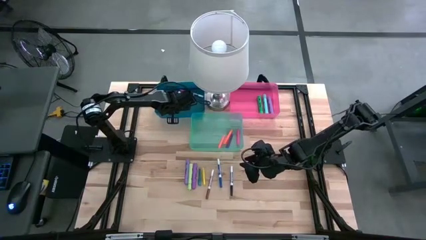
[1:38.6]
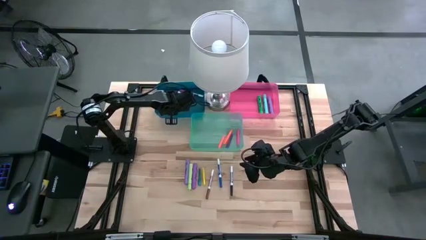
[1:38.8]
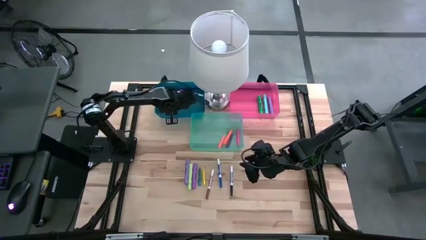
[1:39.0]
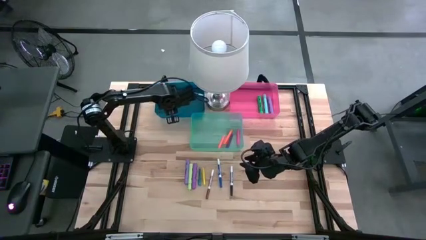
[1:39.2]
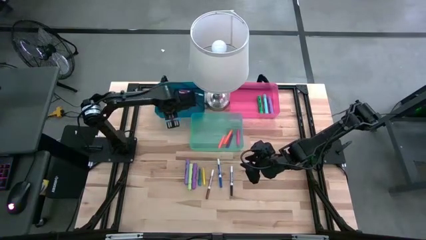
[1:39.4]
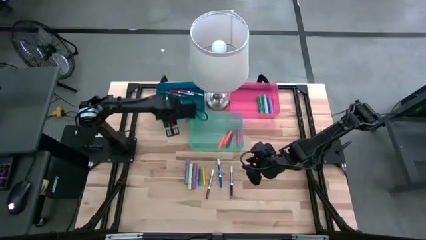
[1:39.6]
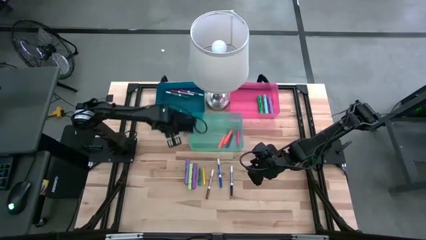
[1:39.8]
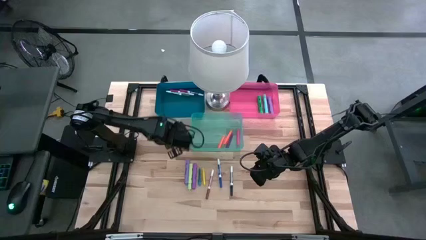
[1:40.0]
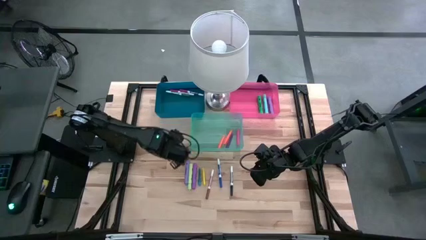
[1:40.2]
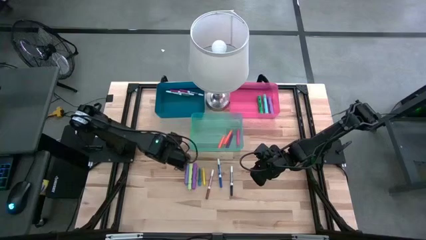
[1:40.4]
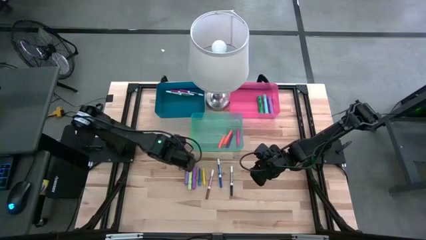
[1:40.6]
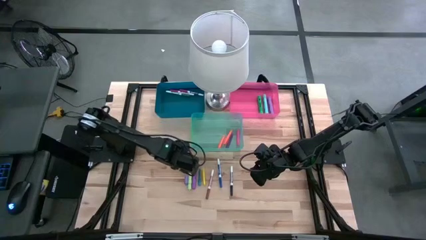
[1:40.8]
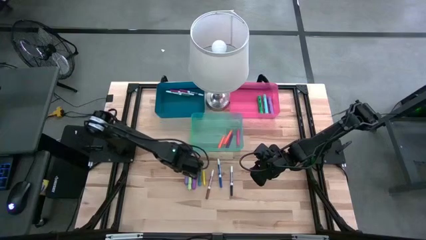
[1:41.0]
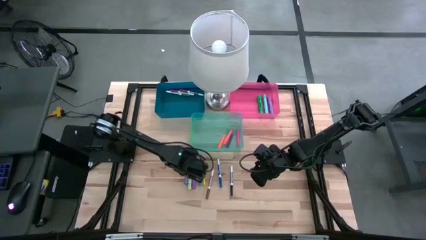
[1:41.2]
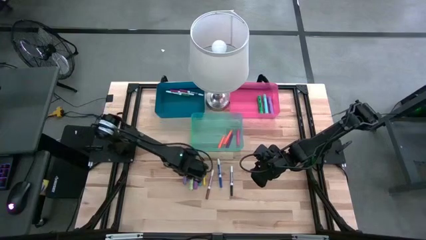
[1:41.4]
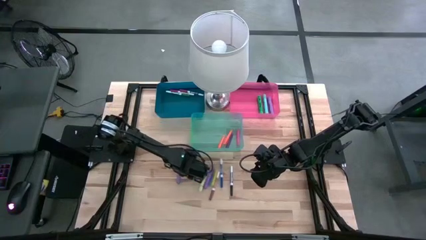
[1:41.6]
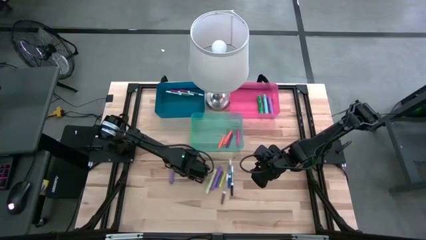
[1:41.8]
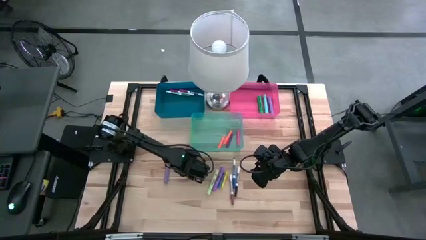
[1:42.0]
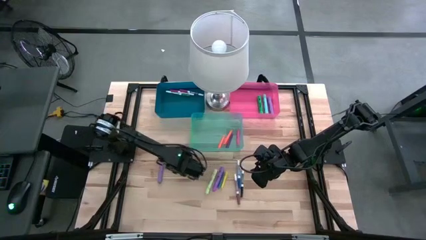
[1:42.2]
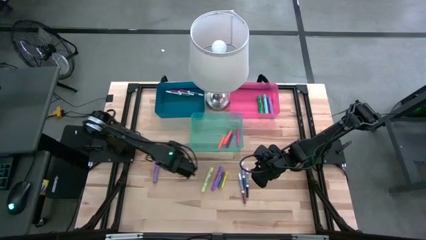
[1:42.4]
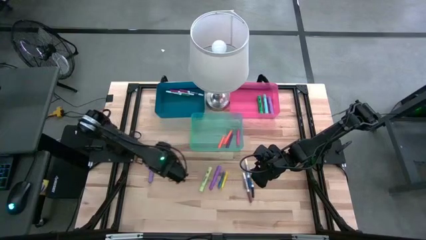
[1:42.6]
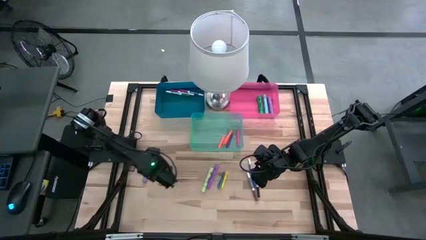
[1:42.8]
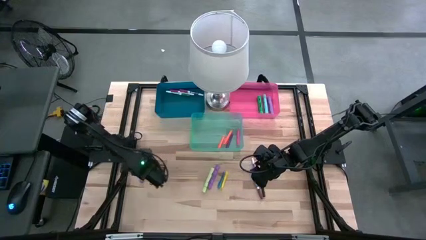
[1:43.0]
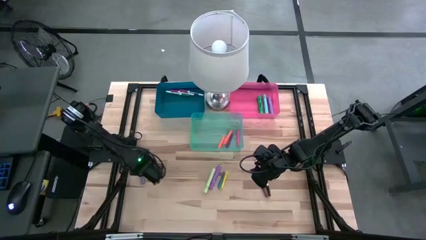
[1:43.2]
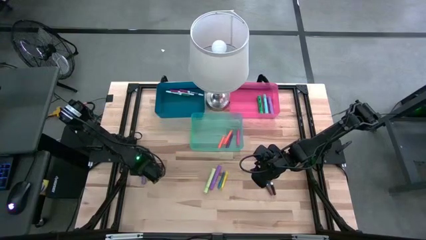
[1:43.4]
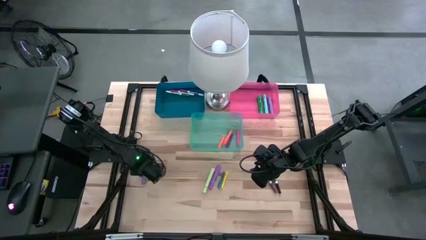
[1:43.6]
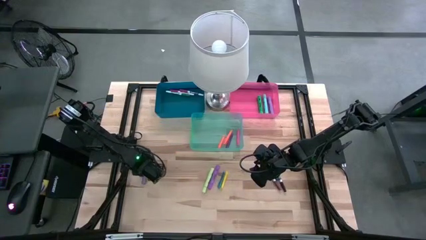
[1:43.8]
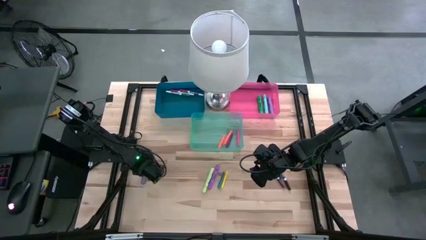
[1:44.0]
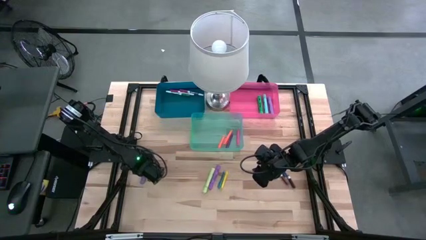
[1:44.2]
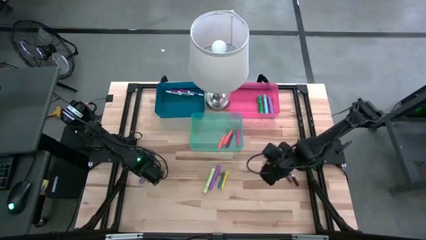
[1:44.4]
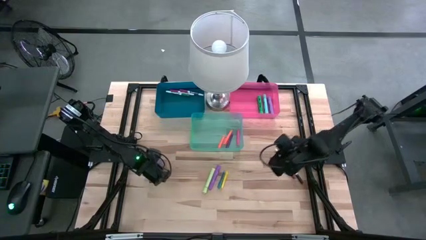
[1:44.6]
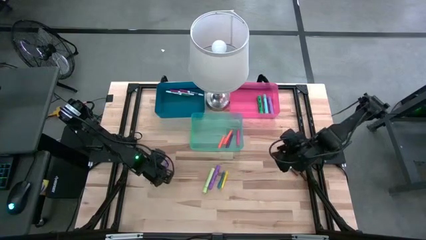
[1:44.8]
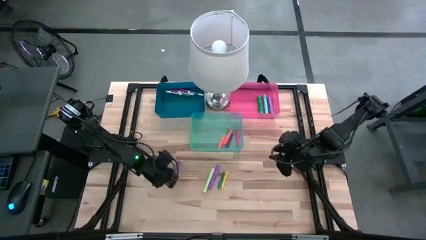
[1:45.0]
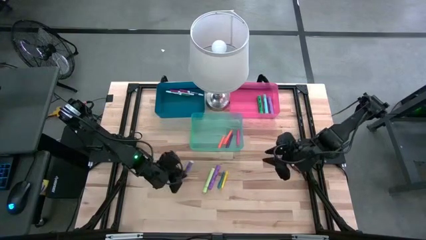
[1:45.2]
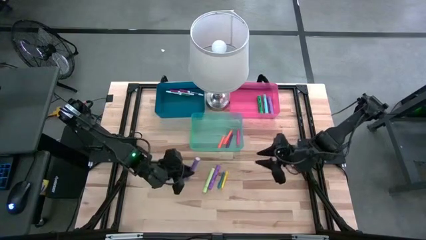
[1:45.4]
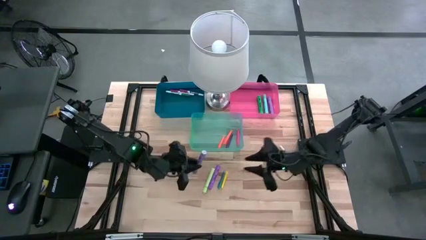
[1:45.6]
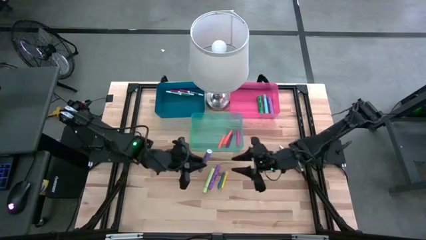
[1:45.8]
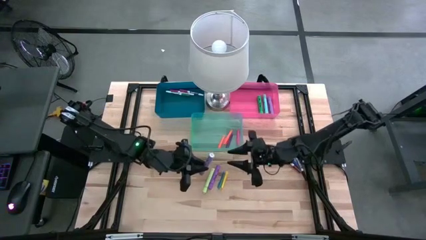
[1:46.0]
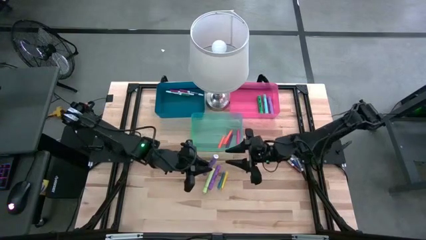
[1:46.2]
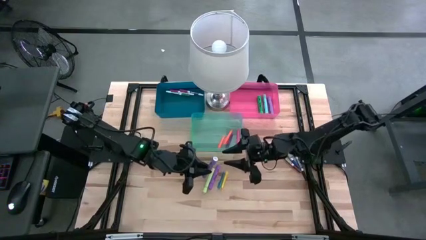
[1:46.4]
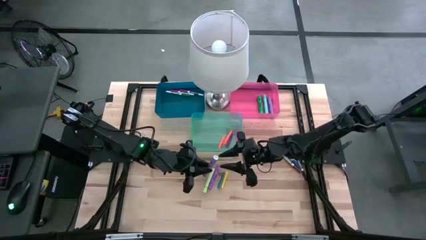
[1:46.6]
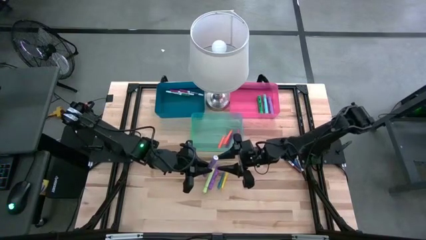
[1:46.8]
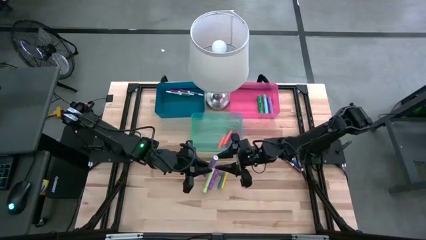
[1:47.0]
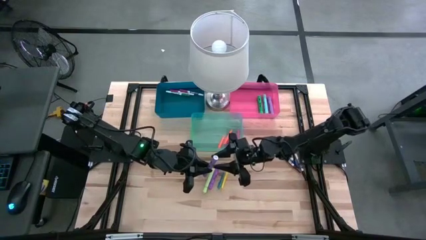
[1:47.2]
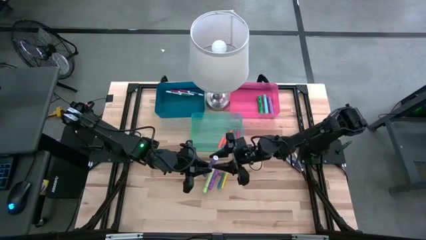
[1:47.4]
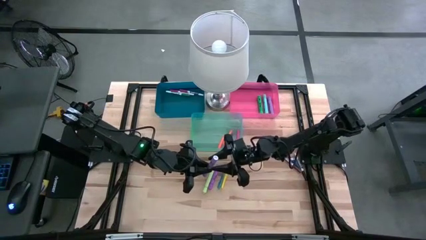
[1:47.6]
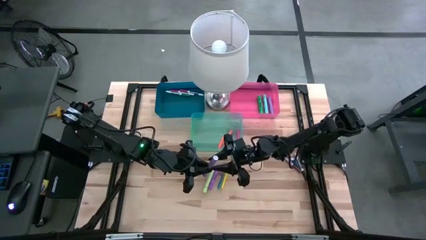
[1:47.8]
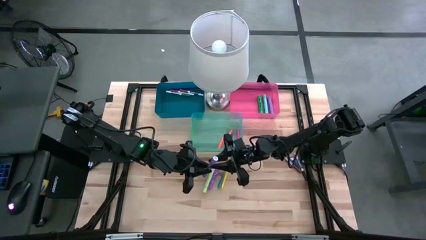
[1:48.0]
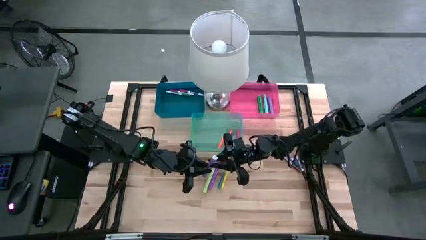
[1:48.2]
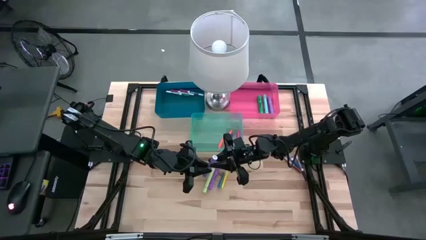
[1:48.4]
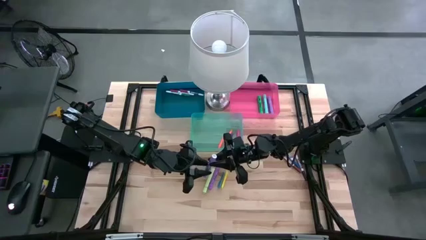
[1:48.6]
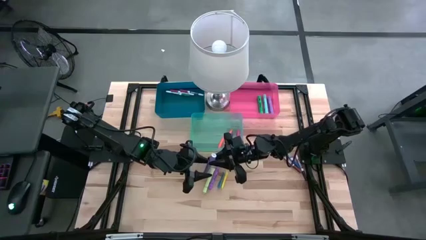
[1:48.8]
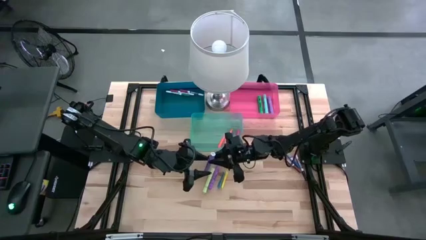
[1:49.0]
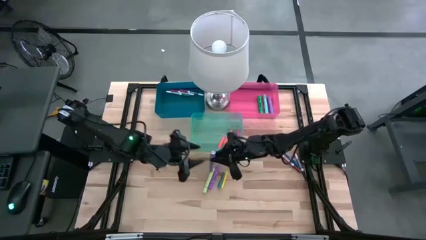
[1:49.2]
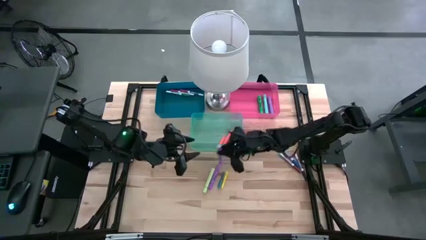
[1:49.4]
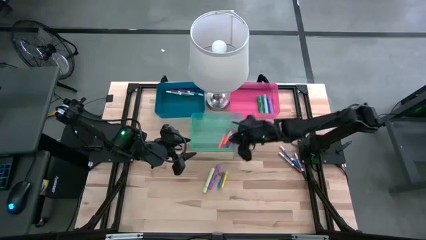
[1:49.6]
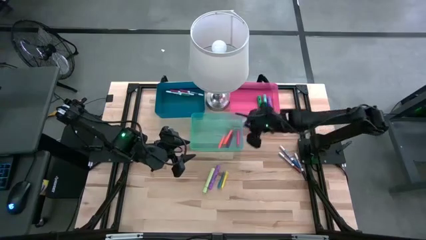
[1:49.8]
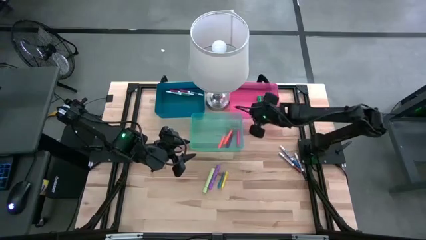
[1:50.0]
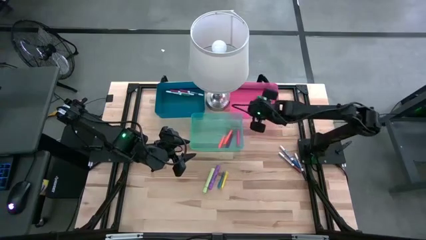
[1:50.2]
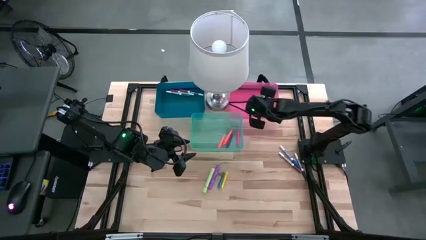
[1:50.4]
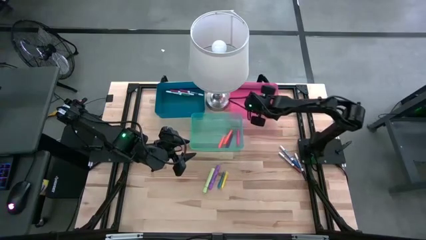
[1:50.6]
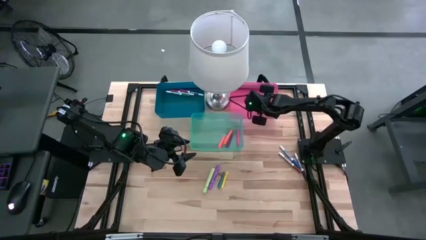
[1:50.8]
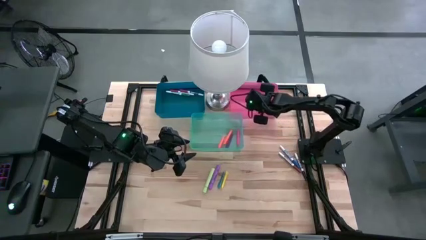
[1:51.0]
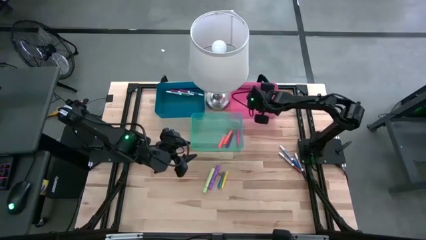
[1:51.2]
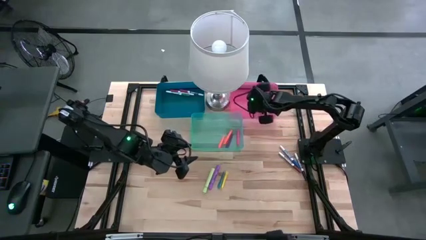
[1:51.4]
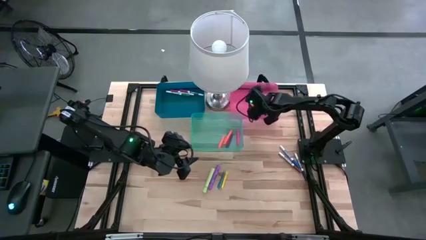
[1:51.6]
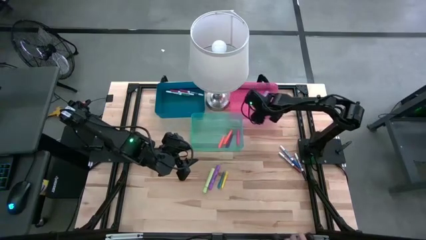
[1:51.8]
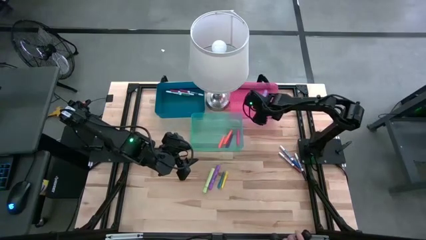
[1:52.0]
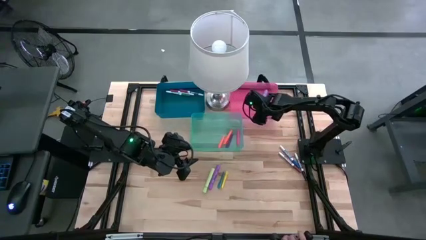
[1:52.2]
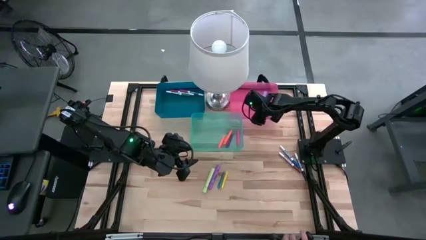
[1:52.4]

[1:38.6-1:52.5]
Task: Pick & Place Markers
Put the violet highlighter pen into the red bin

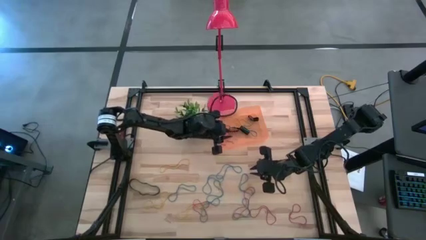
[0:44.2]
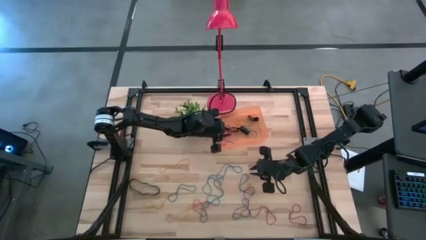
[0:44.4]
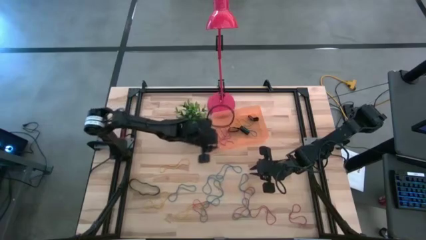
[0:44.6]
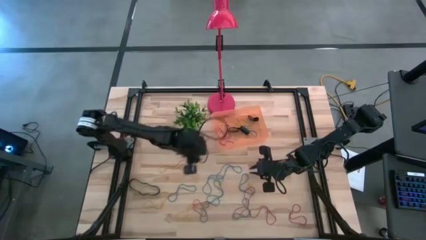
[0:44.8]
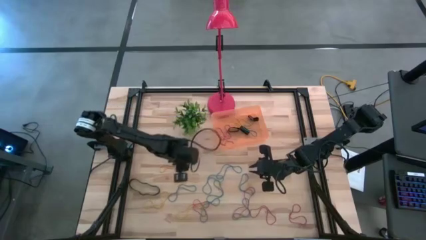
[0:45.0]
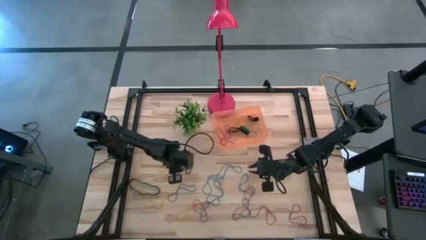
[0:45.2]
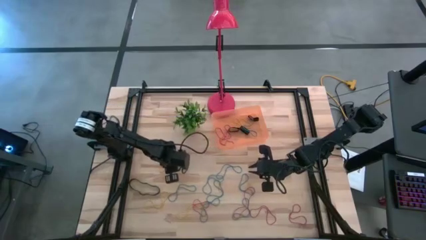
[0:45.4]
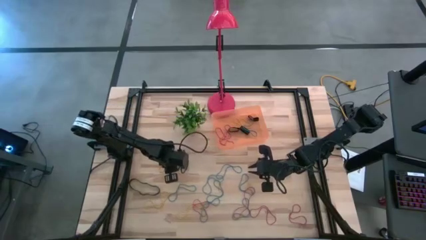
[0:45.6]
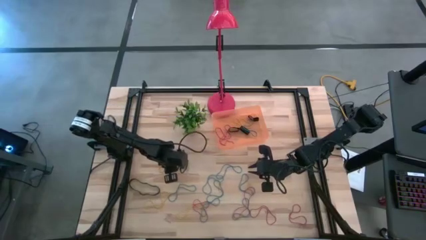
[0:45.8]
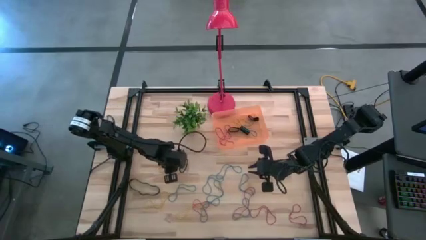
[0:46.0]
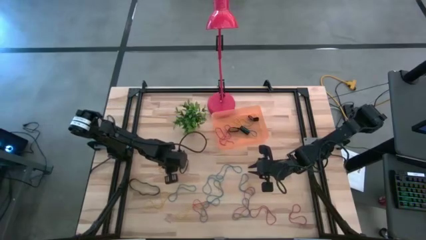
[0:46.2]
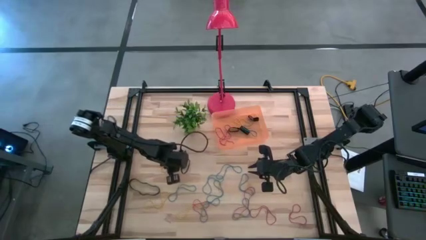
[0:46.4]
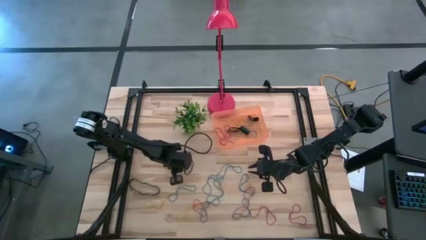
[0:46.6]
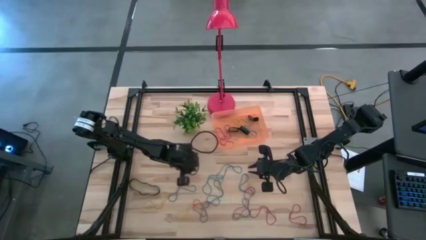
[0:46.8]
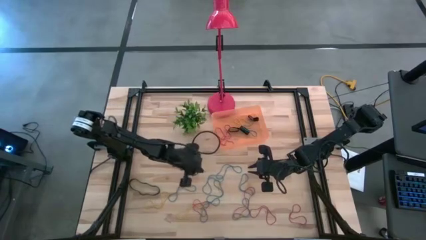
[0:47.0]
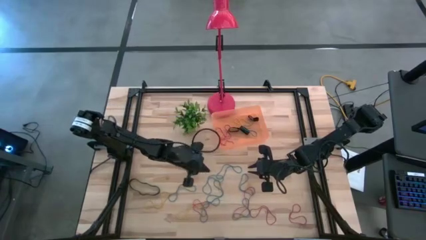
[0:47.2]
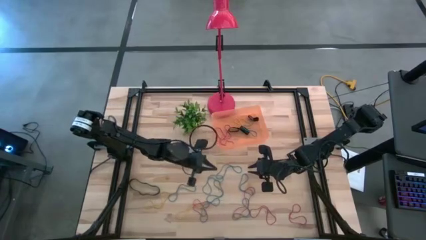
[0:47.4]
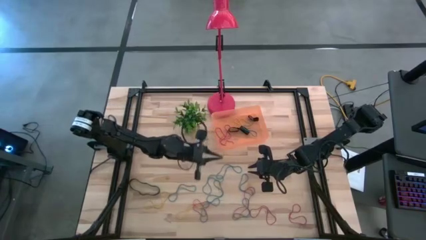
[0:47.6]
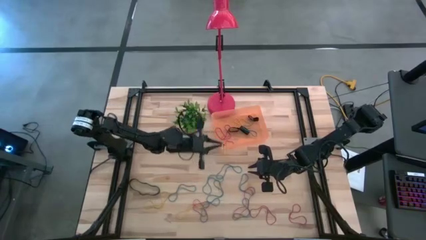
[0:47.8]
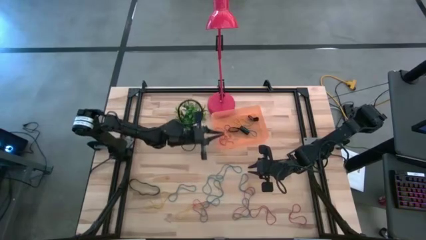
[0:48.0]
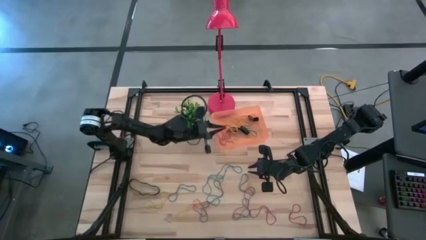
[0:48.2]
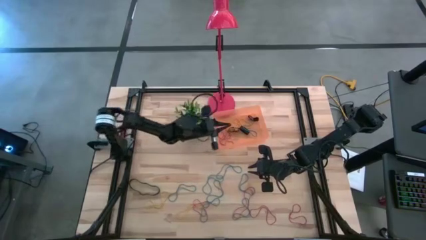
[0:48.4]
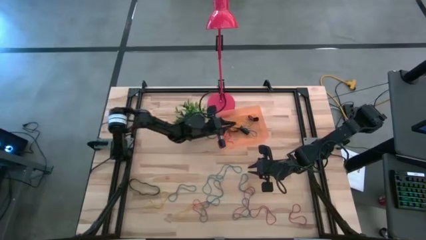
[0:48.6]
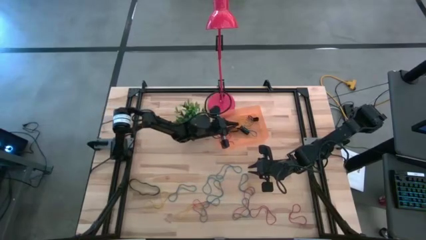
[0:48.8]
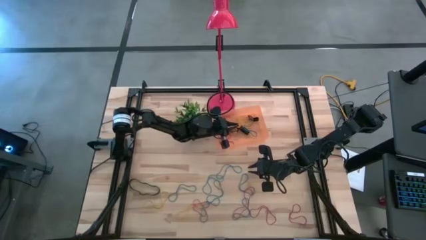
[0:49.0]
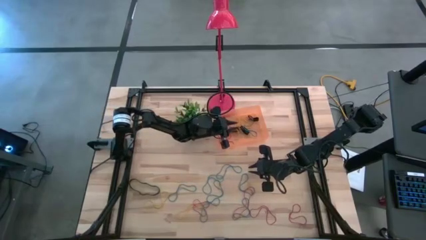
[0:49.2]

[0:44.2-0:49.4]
Task: Pick and place rubber bands into bin
Put the top left yellow rubberband into the orange container
